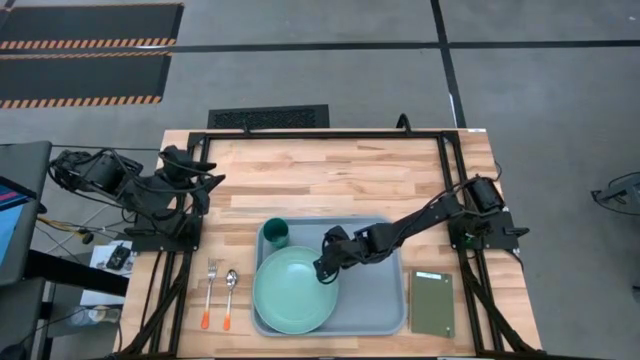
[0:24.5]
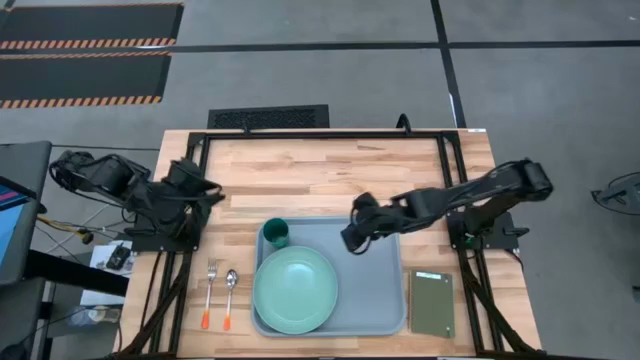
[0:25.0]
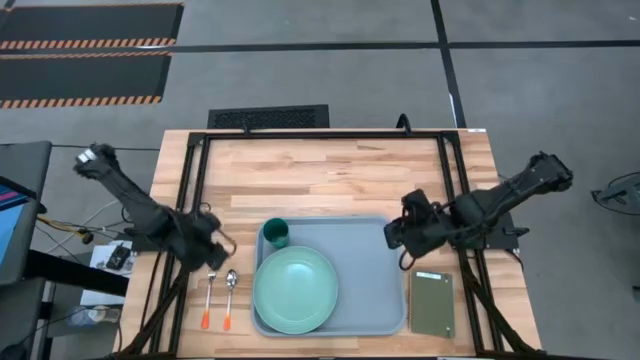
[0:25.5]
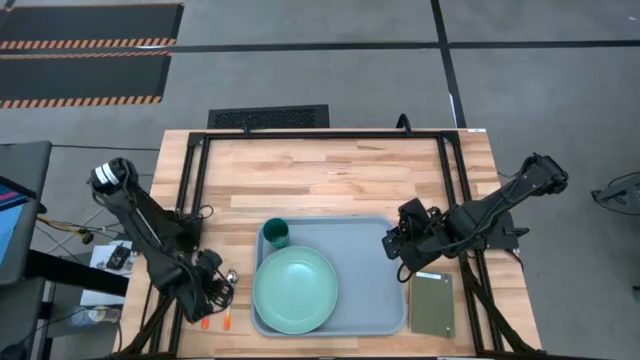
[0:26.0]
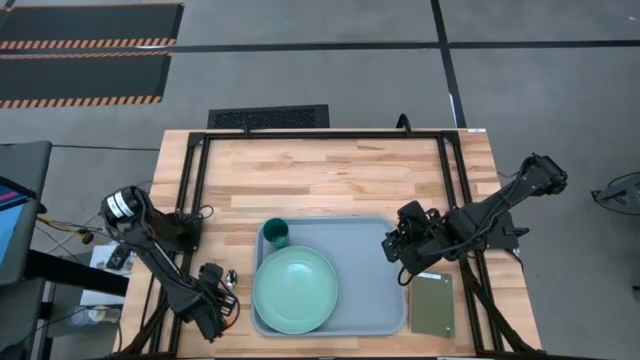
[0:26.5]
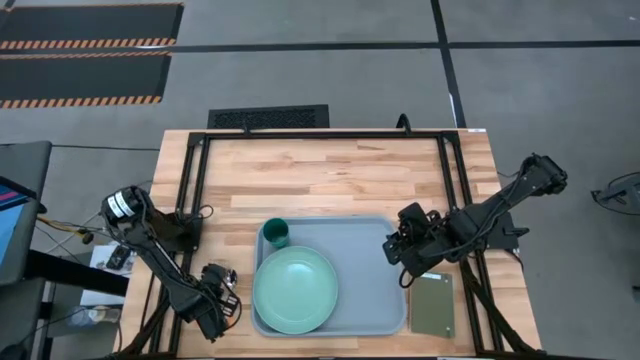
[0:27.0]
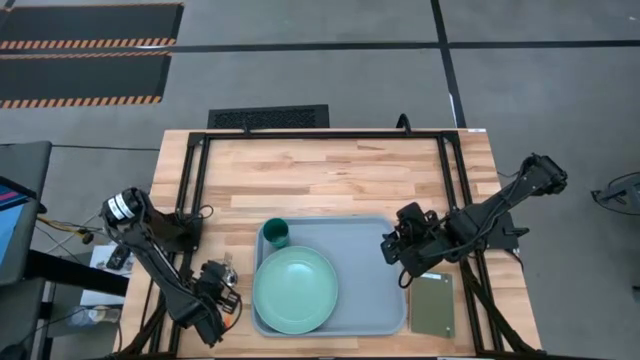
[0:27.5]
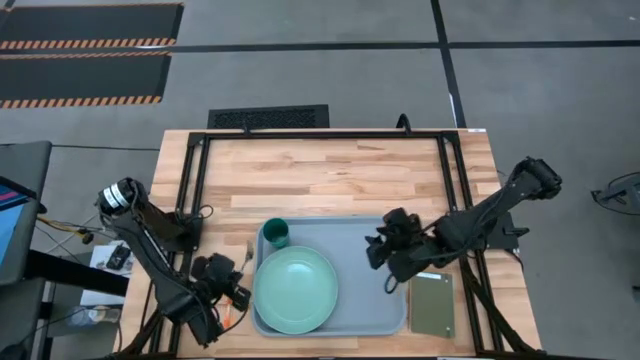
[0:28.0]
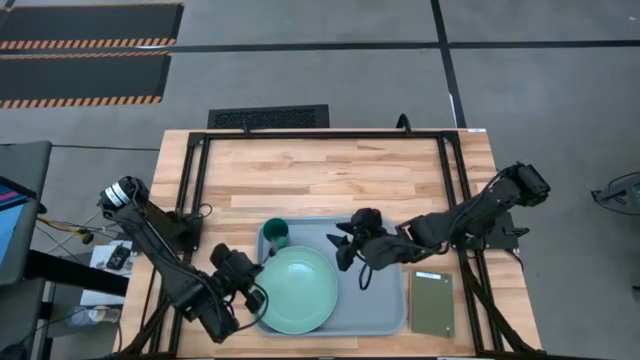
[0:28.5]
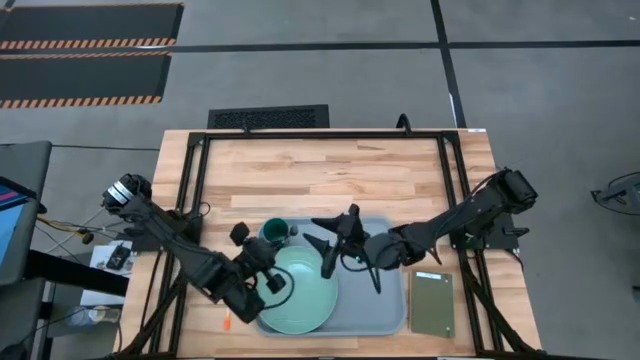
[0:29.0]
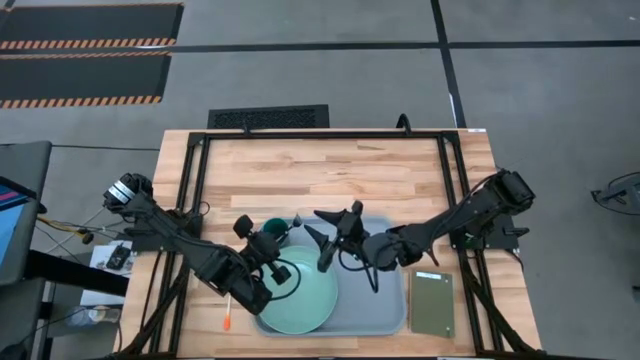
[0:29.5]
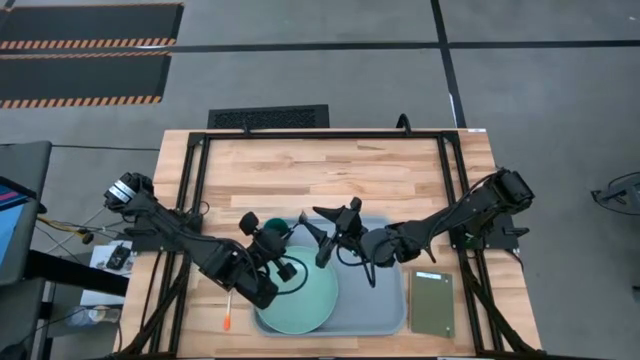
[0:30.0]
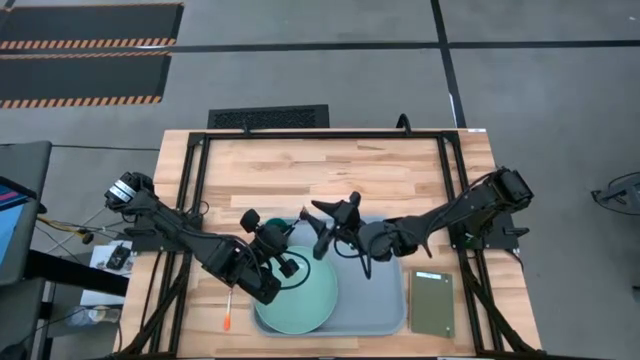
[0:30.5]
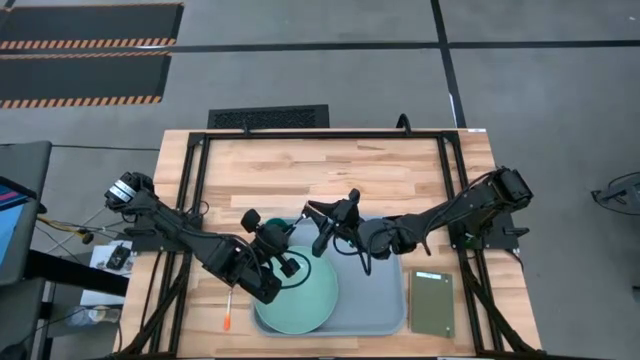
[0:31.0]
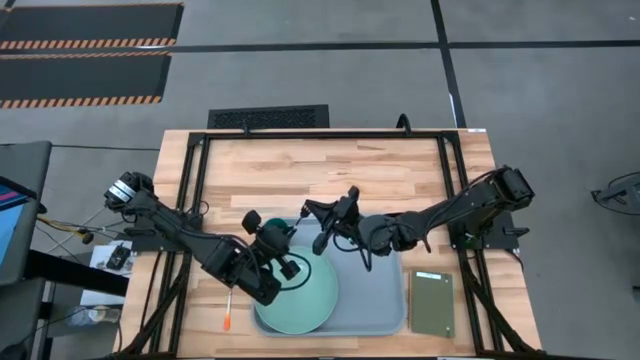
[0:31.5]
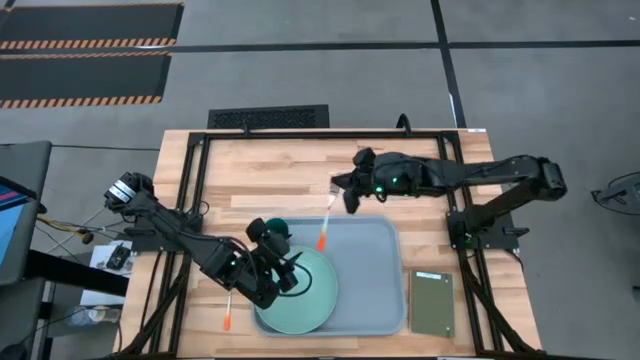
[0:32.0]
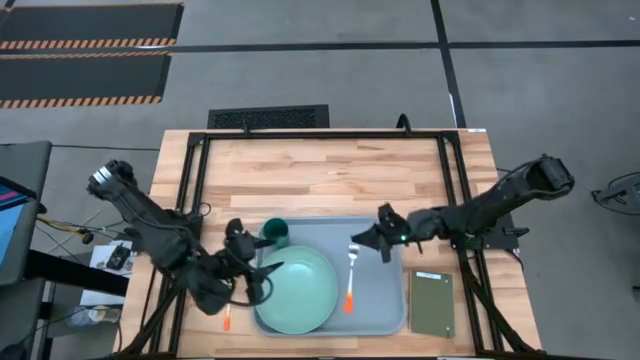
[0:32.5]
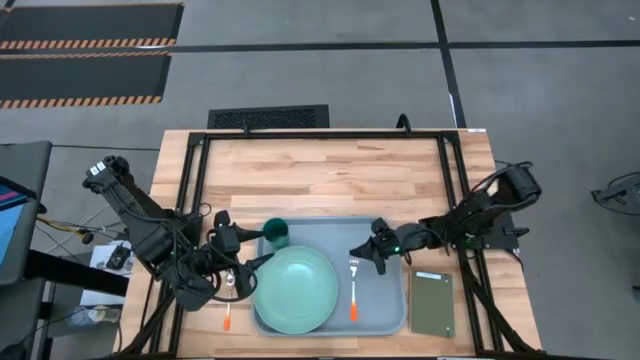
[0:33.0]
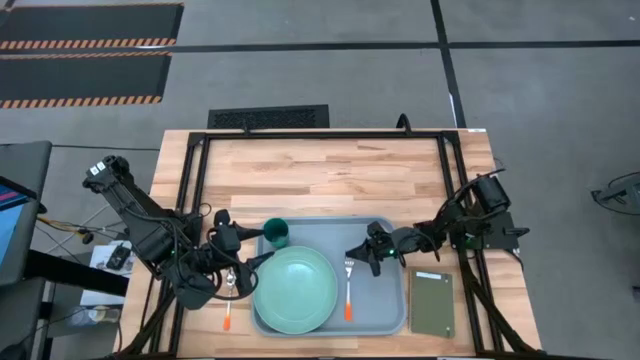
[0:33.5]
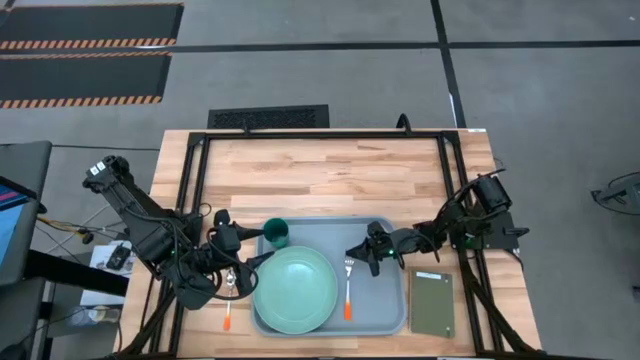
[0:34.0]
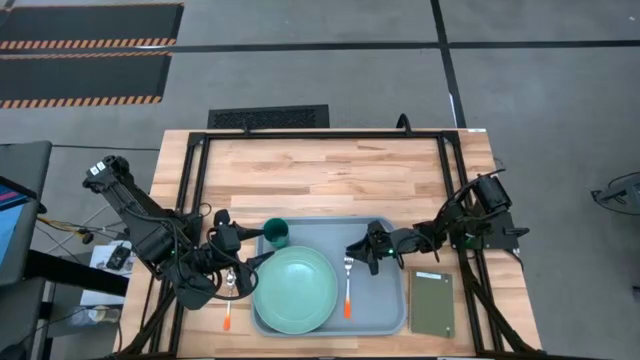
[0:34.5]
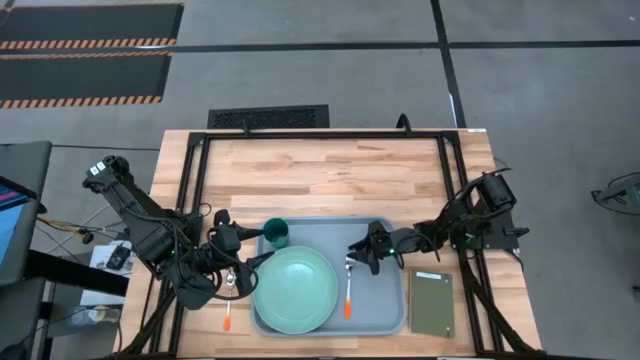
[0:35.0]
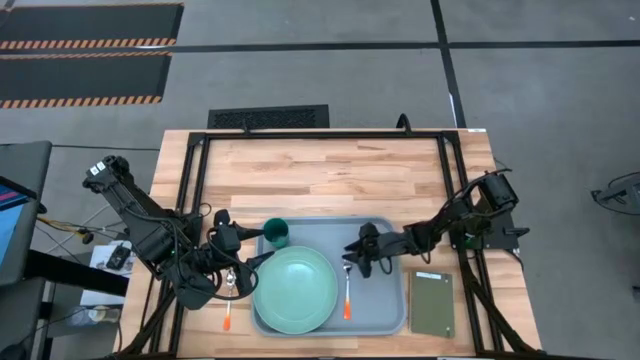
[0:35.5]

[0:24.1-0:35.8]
Task: Pick and place plate/cup/fork/spoon on tray
Put the orange fork on the gray tray to the right of the blue plate

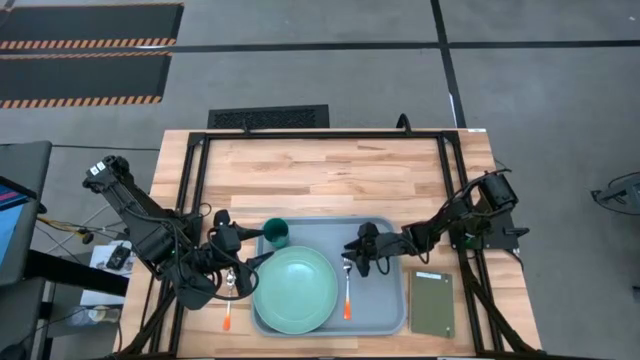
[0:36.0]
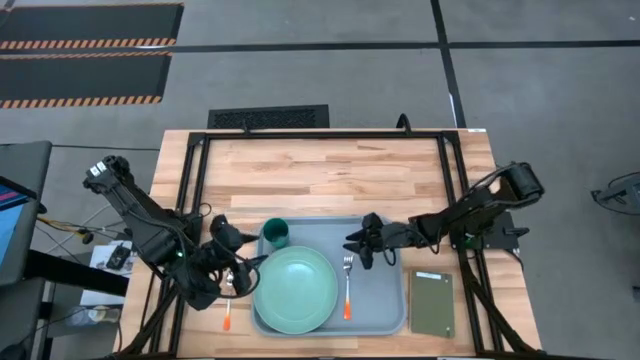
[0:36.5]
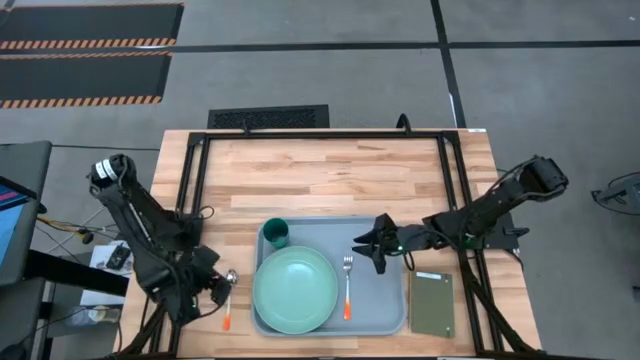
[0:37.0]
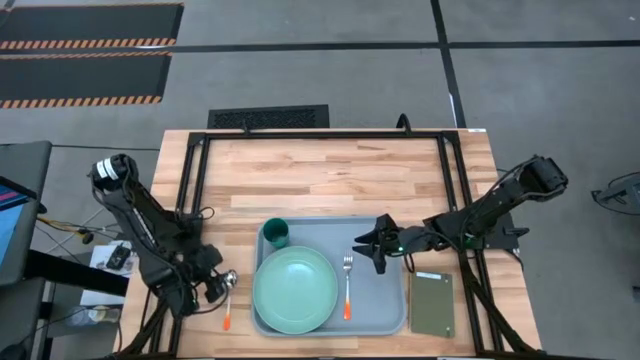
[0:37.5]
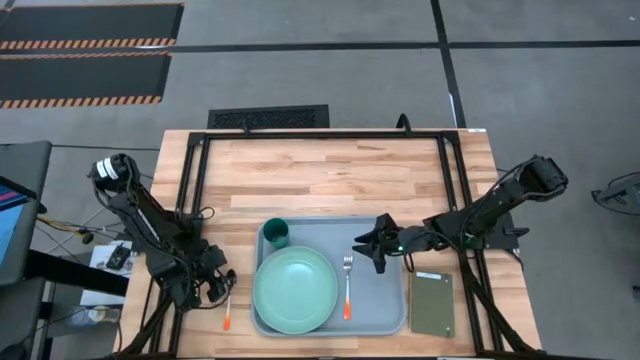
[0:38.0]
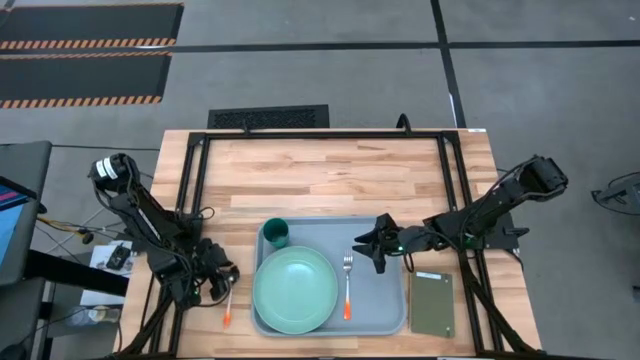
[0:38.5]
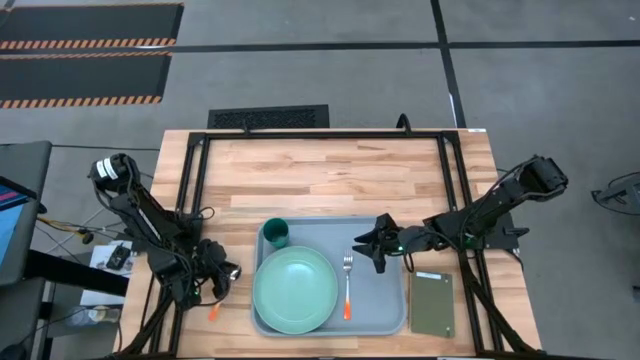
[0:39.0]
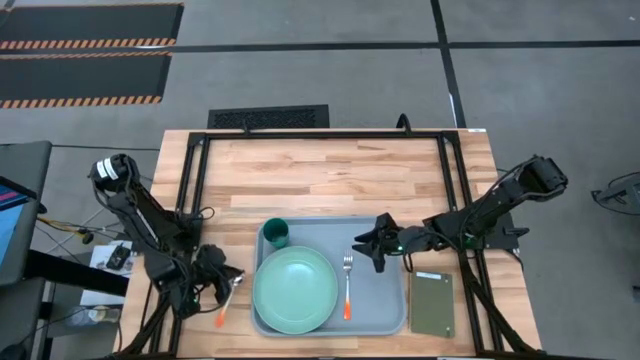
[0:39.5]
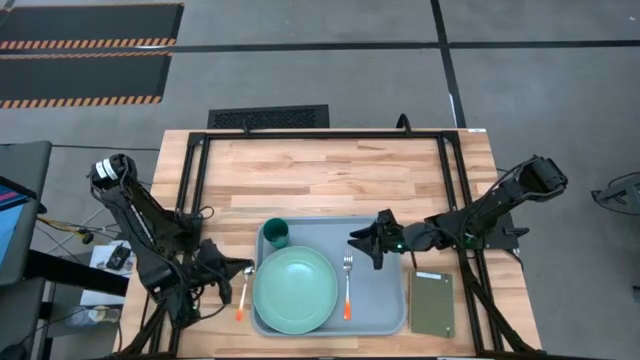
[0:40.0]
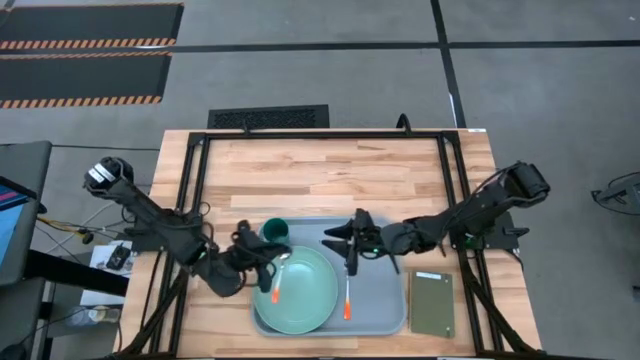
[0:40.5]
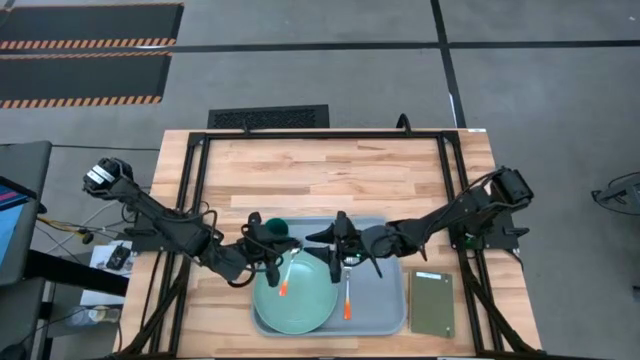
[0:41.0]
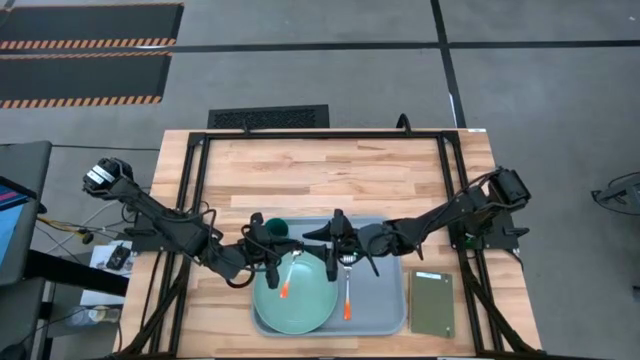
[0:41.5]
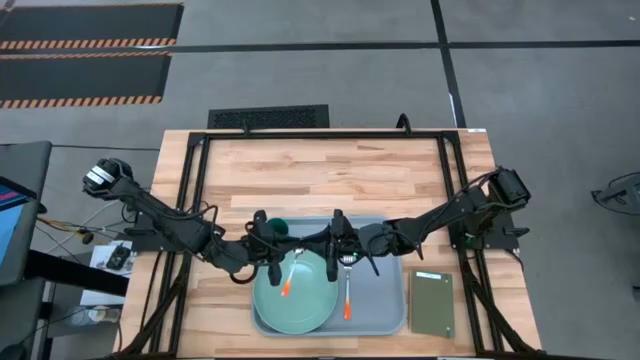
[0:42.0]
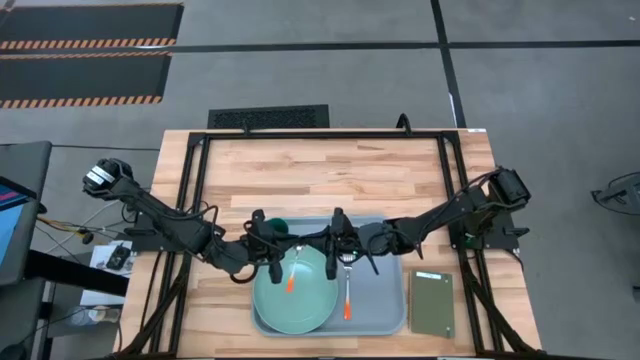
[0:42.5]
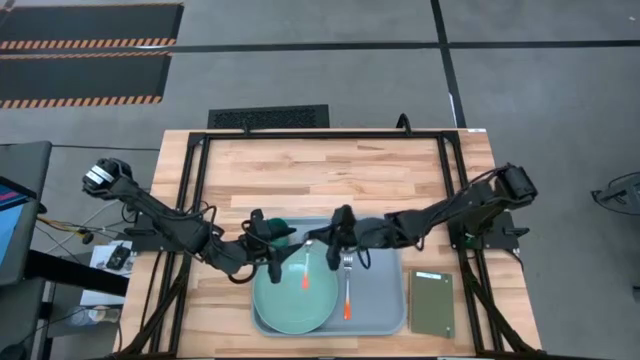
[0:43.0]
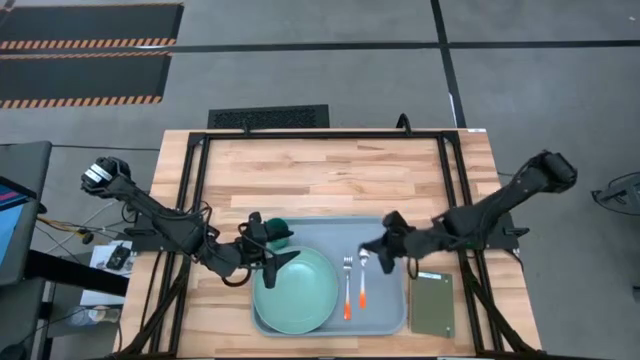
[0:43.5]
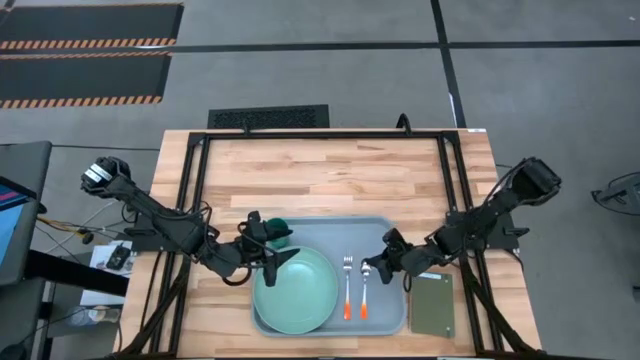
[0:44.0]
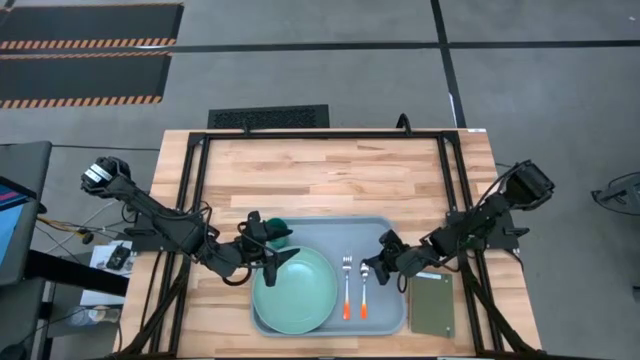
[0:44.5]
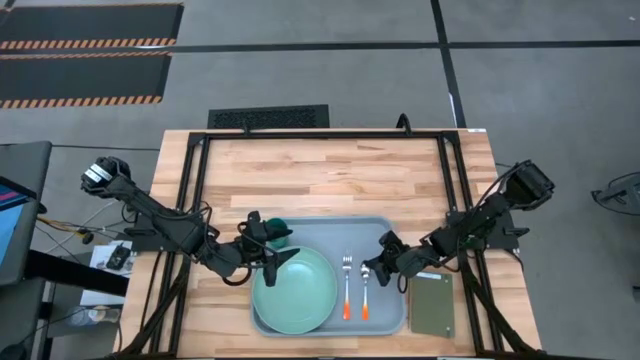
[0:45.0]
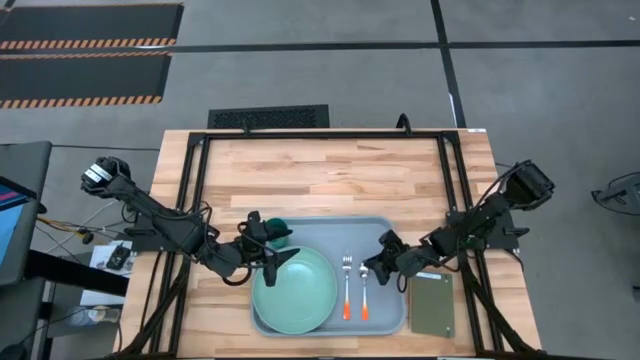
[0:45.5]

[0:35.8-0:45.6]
Put the orange spoon on the gray tray to the right of the orange fork

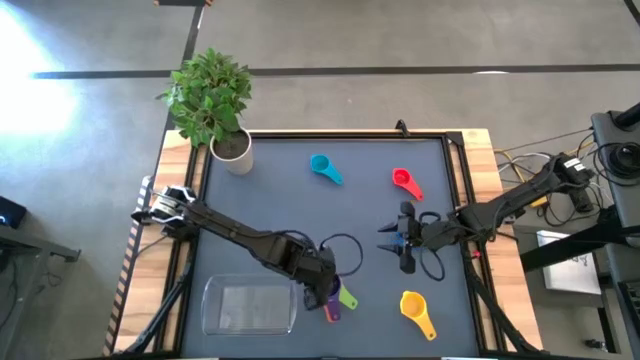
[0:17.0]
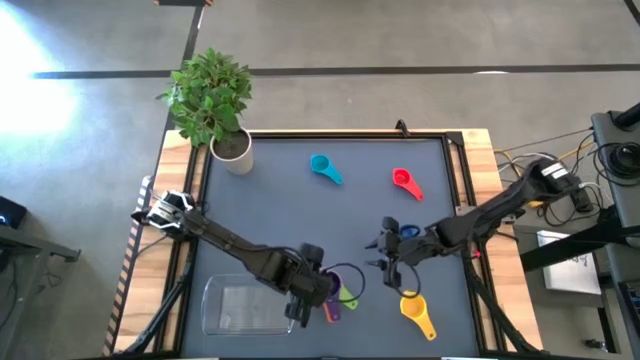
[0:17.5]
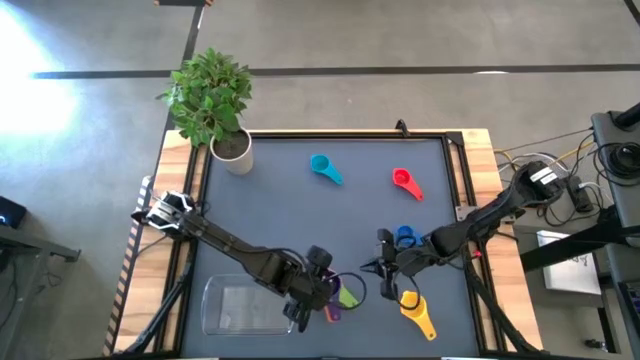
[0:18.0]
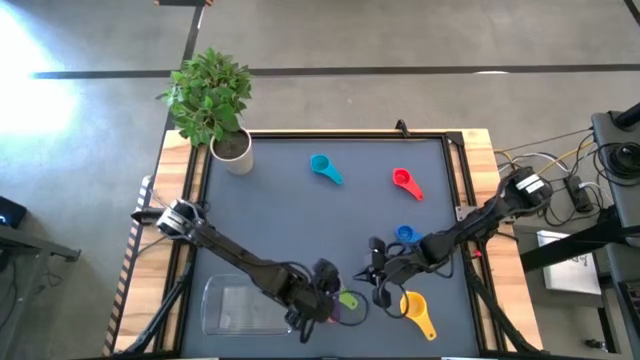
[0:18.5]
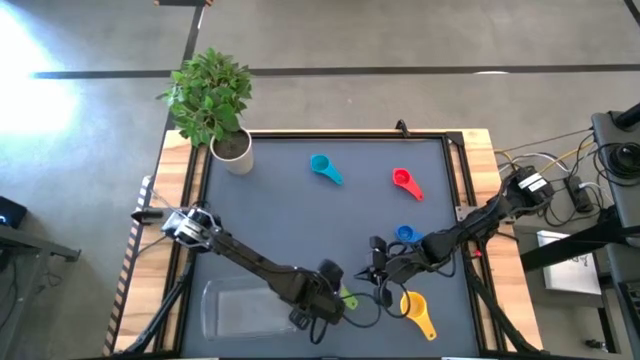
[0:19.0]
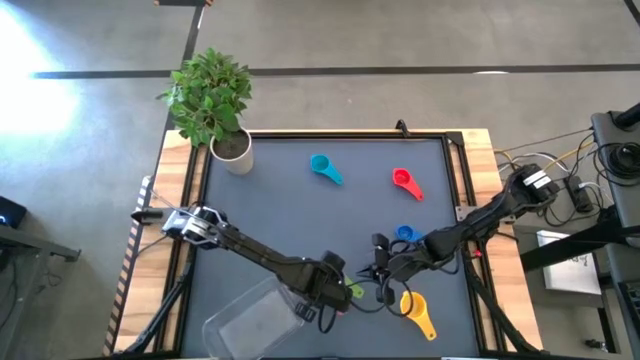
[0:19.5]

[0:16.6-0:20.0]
Task: Nest measuring cups in basket
Move the stacked measuring cups to the center of the table
